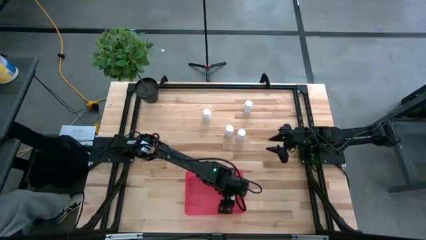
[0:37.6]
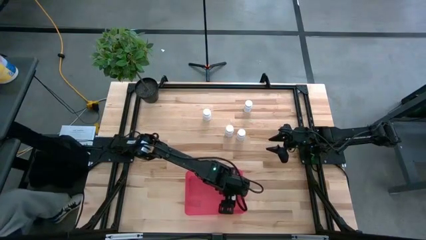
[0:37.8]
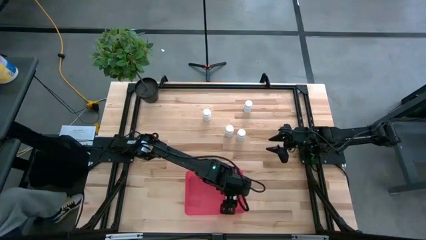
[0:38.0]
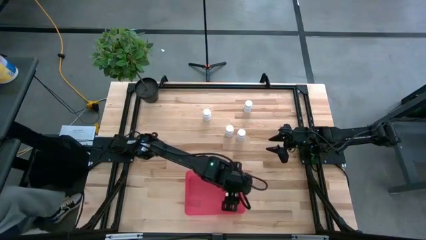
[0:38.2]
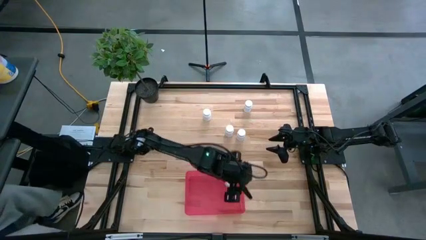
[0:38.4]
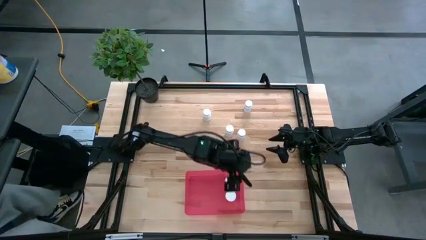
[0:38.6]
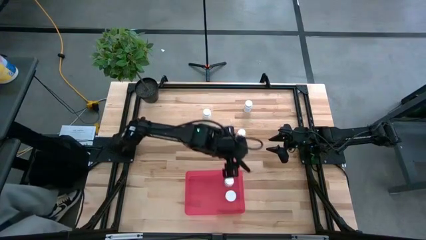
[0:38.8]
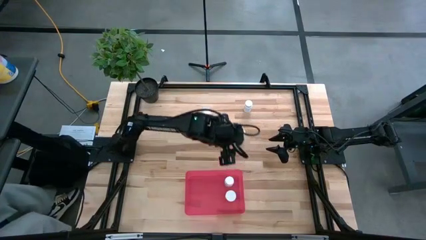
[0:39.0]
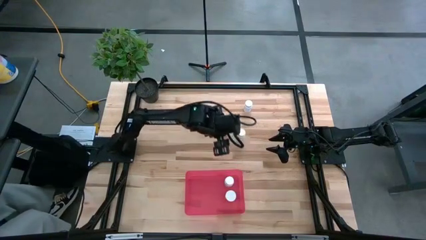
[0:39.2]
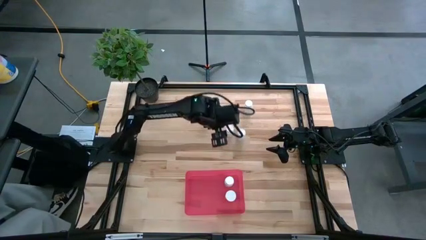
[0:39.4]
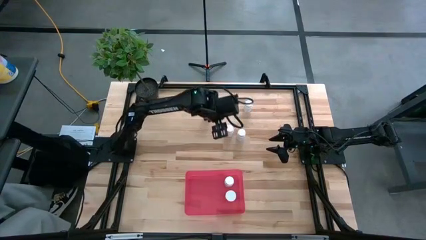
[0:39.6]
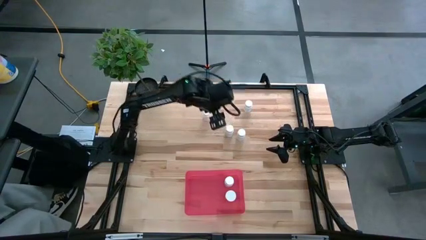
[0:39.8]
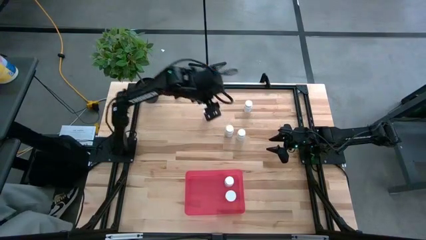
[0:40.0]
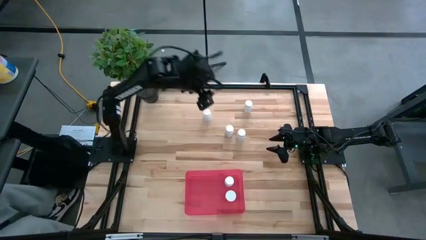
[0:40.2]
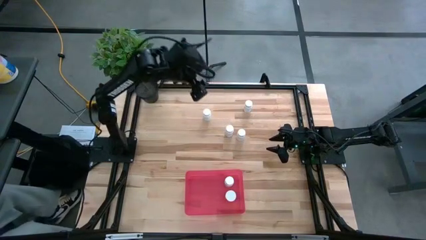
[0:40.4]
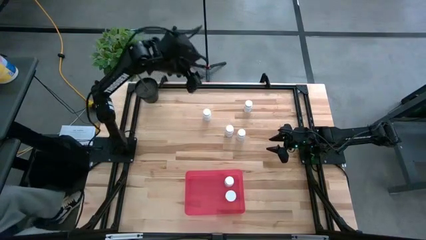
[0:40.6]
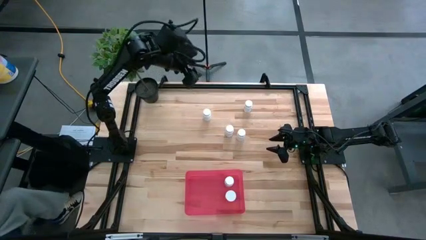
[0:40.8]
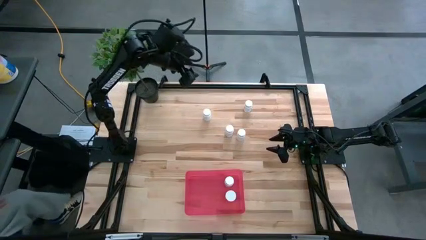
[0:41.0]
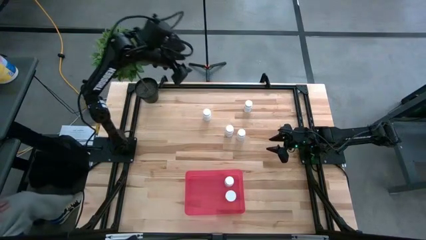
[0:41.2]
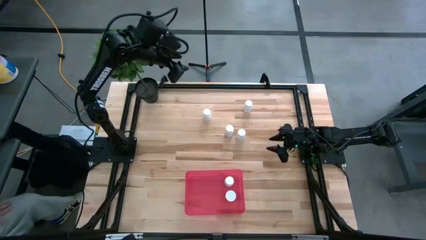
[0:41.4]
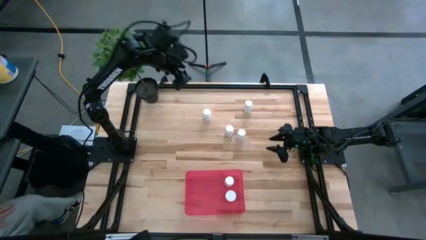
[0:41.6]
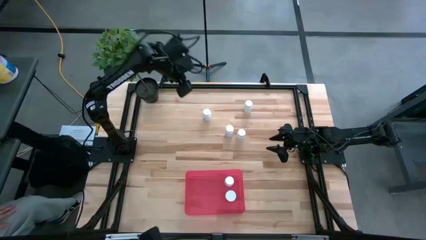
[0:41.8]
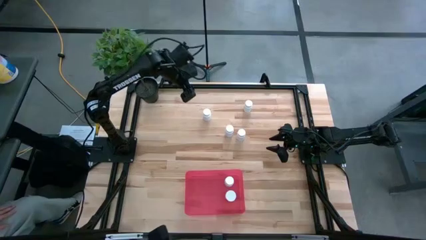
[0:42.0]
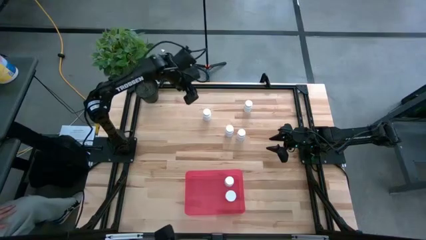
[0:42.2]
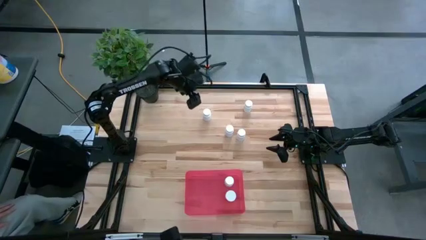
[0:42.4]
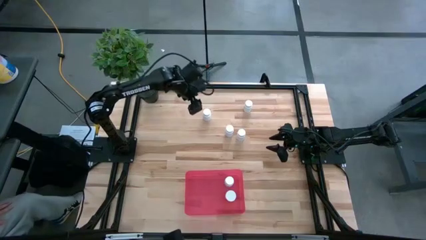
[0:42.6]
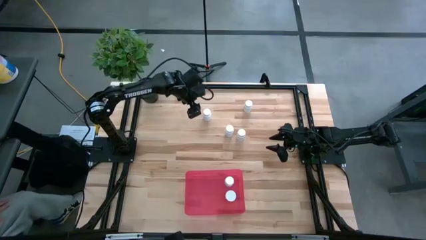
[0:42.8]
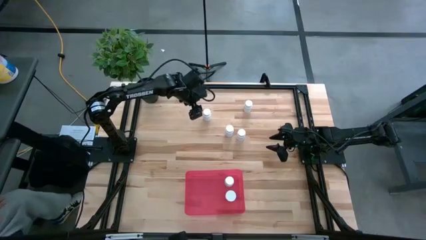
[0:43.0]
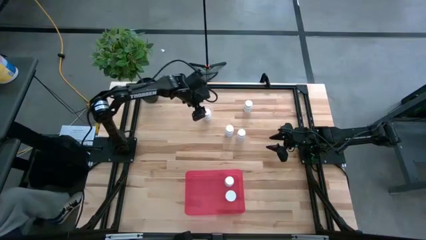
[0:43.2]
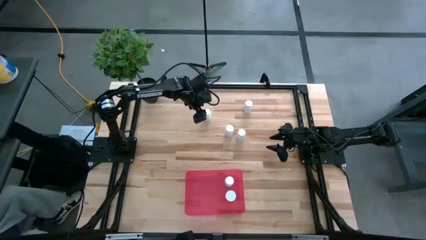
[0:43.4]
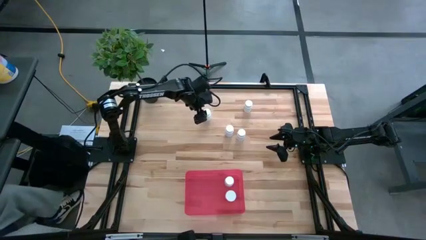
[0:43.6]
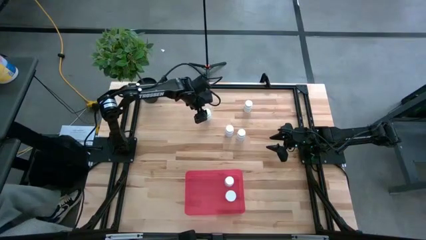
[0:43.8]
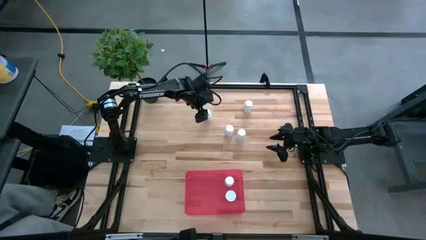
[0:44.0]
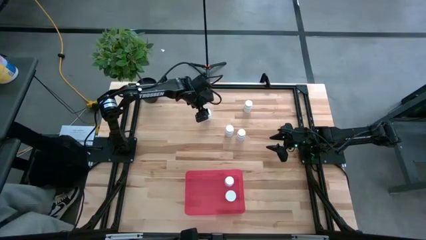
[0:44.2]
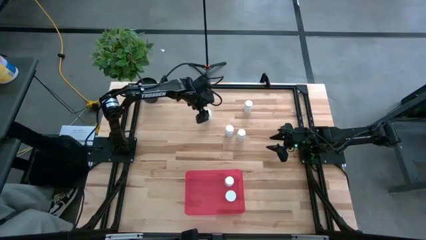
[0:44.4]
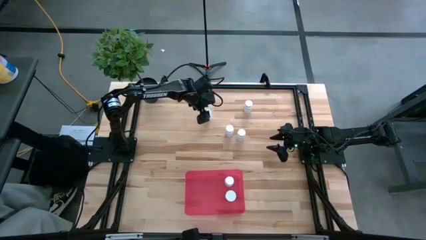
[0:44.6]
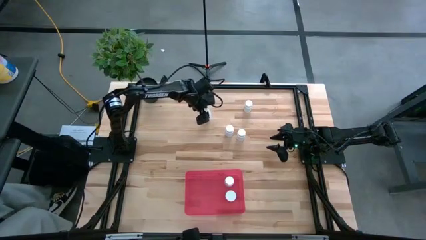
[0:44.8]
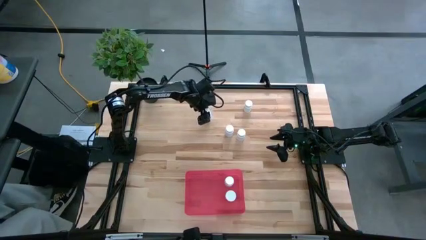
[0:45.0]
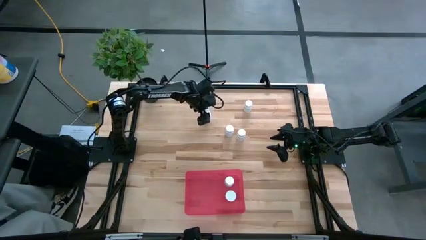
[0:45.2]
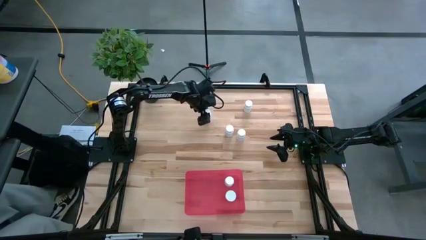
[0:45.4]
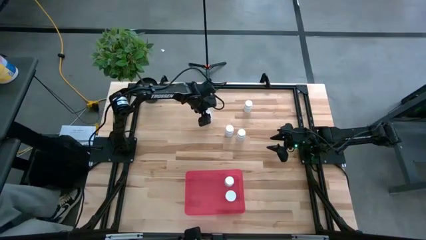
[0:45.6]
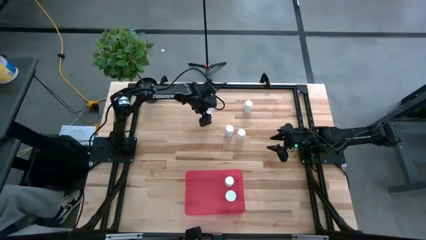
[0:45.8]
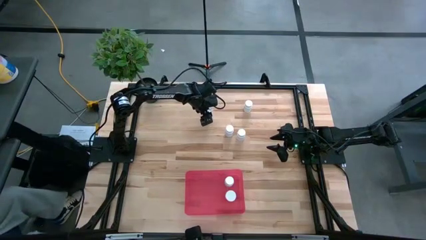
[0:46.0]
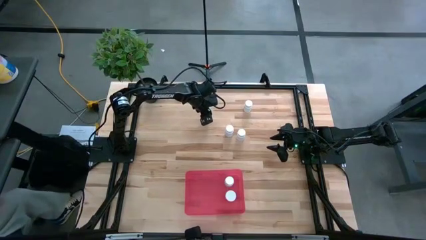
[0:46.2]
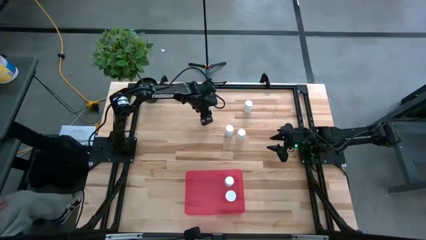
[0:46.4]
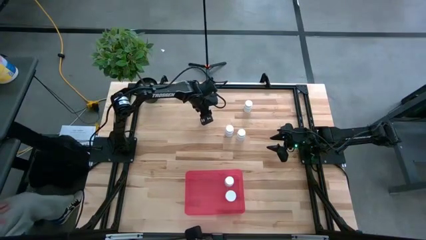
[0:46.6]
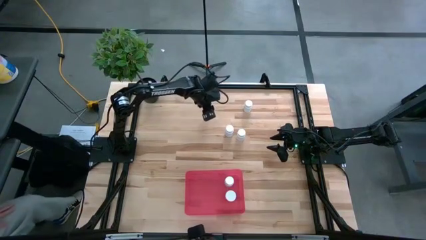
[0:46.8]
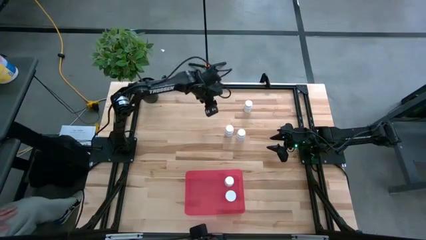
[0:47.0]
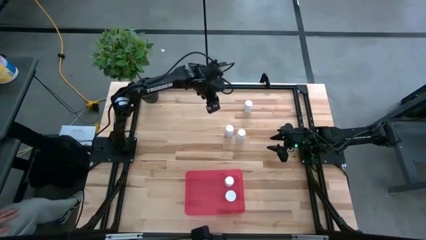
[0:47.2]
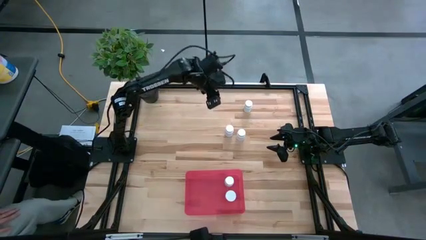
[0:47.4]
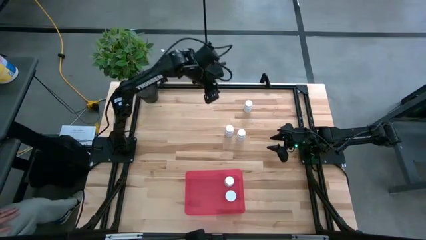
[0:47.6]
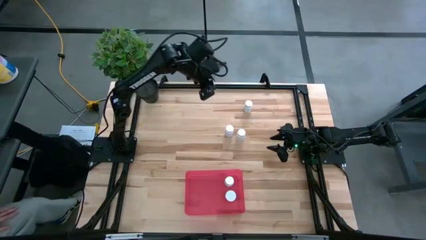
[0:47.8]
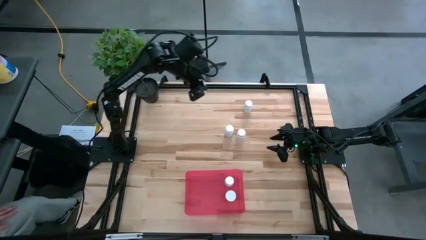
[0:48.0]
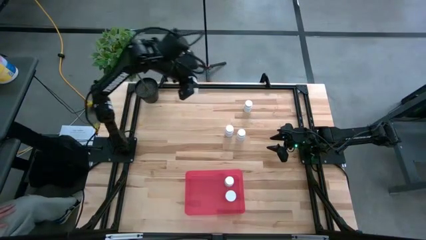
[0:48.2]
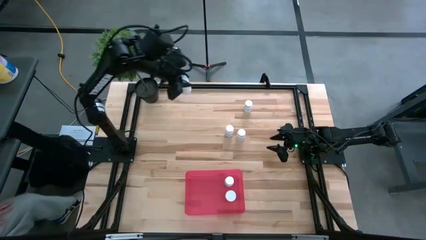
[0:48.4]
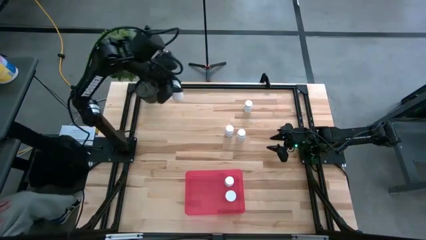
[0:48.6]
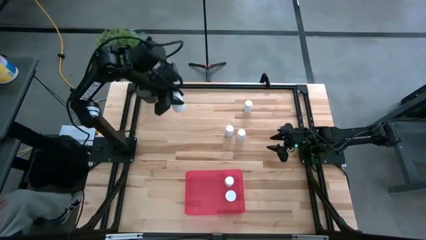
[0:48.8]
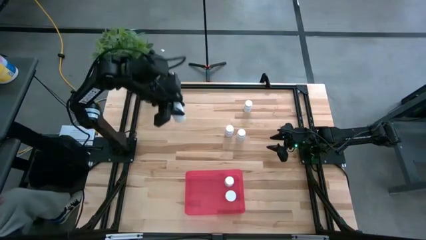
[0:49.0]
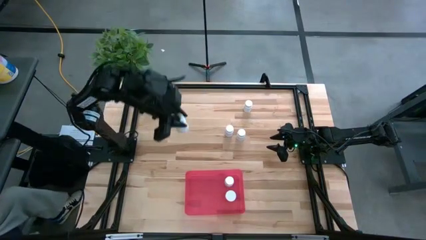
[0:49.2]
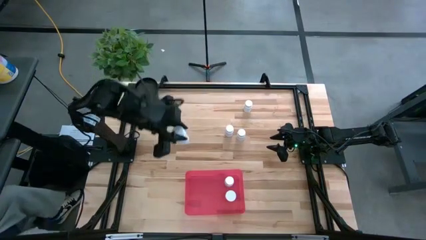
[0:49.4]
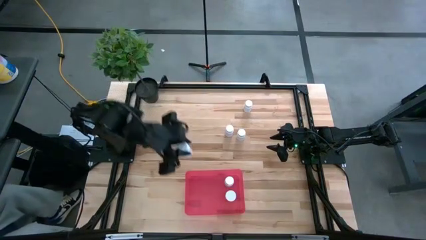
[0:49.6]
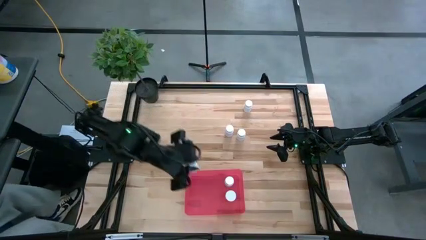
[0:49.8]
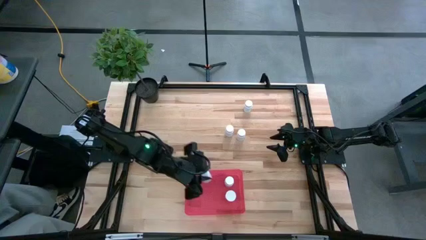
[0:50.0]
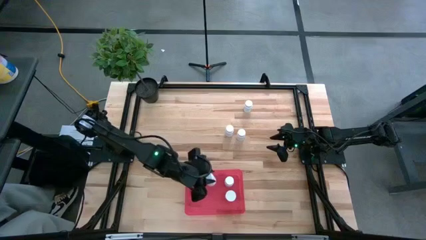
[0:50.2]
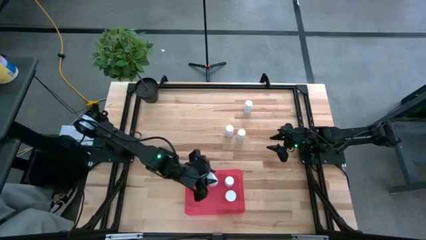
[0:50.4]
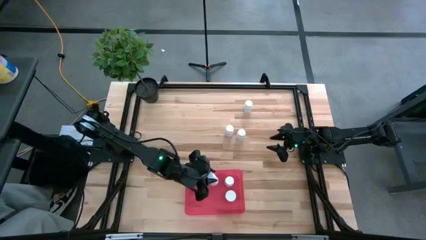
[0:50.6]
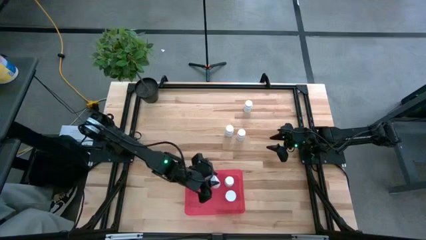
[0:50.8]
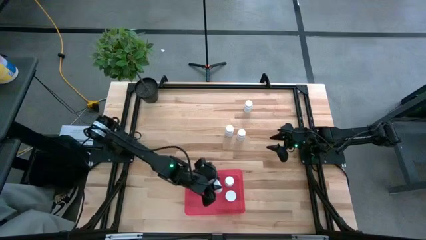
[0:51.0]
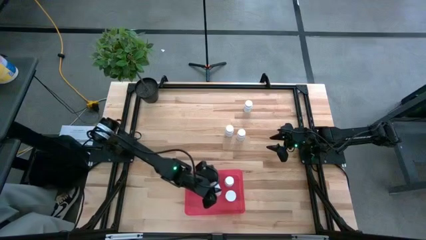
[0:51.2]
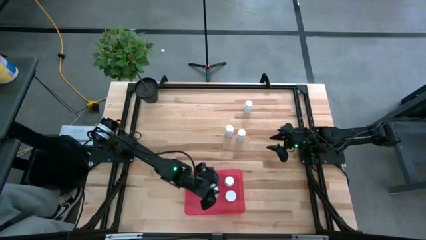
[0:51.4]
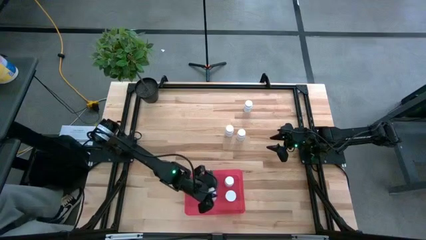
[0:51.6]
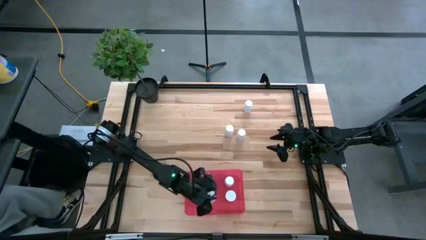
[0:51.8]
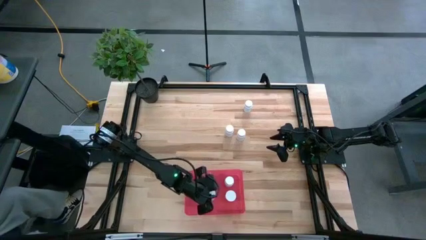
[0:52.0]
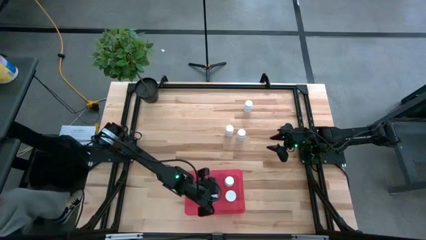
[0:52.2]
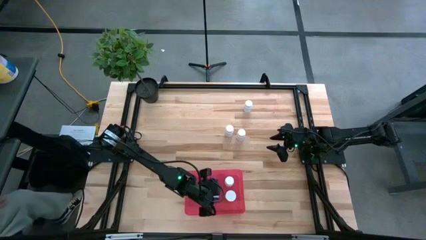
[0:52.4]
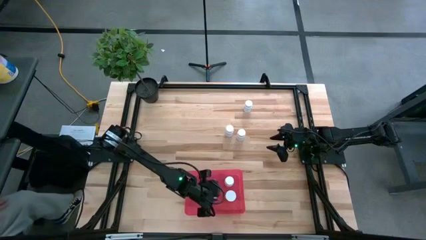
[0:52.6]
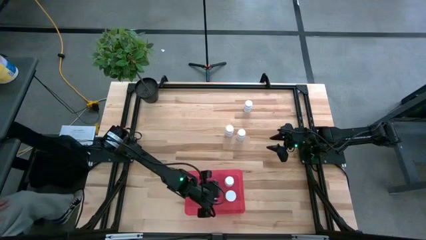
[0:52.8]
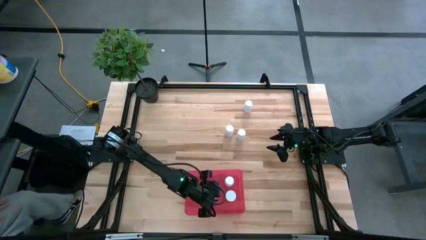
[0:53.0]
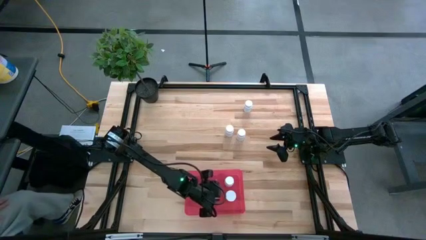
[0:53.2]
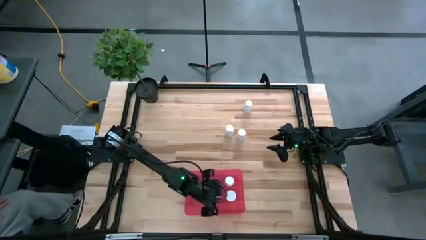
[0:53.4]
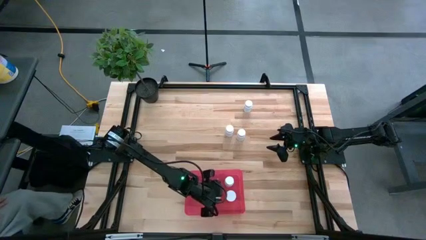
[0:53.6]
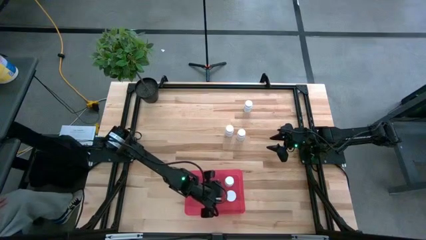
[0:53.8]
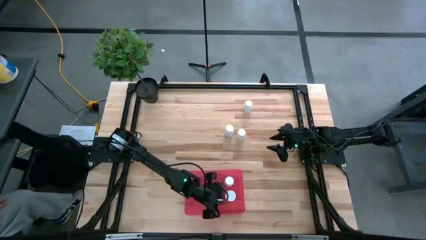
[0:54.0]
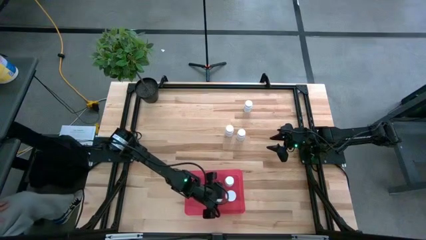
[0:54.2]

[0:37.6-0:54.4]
Task: Pick and place pill bottles into a basket
Put the white pill bottle into the pink bin
